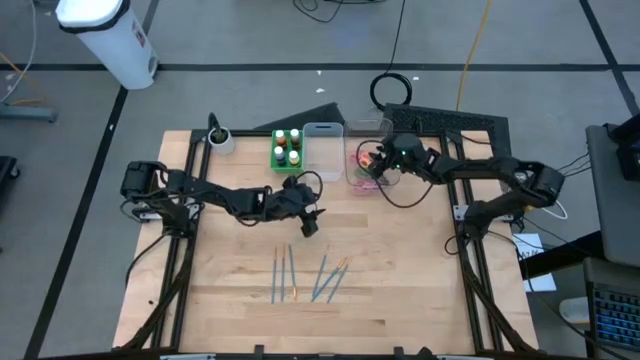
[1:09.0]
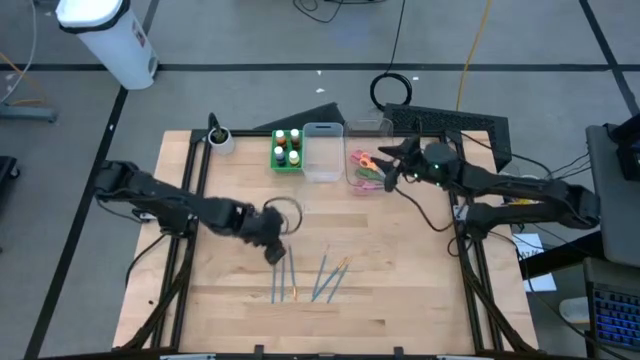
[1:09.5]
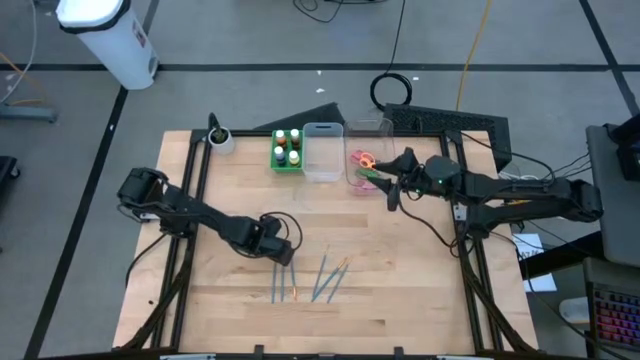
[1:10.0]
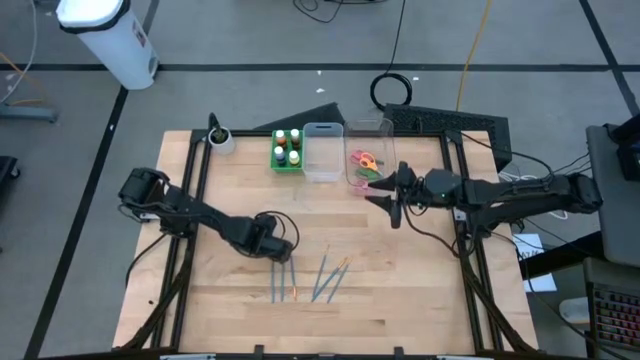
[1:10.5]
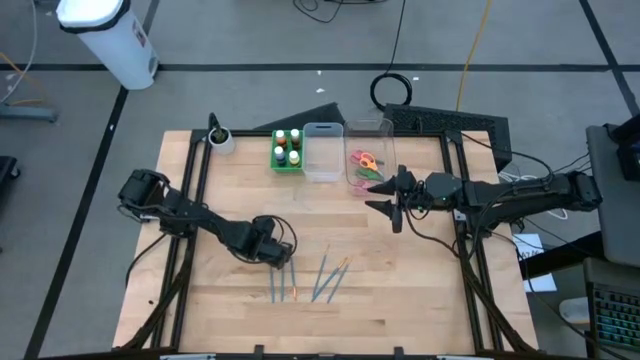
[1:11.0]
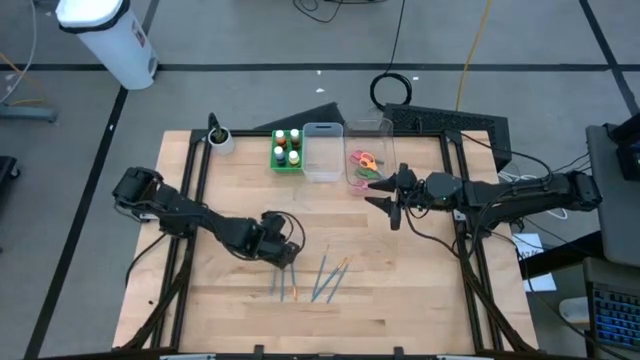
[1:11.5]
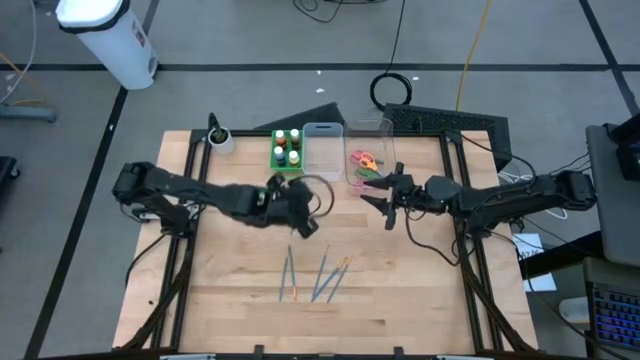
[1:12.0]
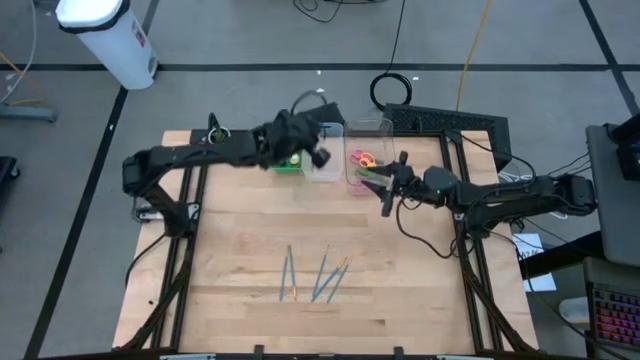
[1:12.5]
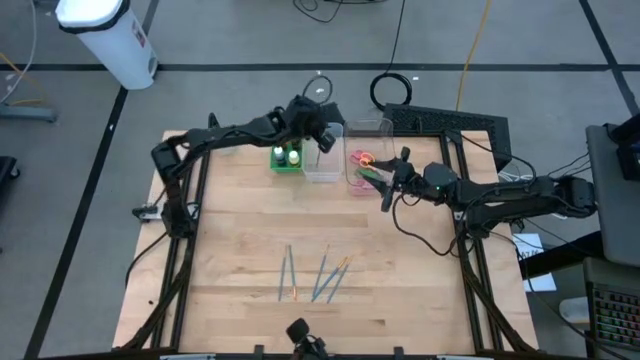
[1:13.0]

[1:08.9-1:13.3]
Task: Pick & Place Paint Supplies
Put the blue paint brush into the white bin

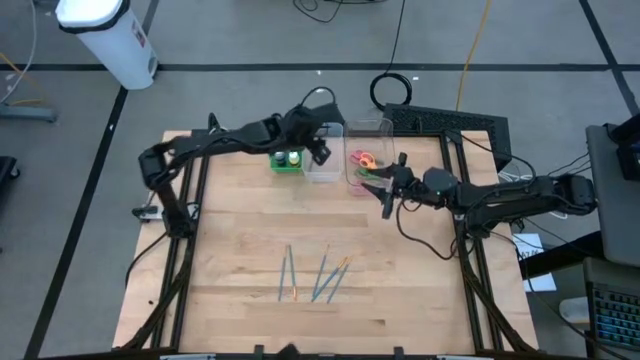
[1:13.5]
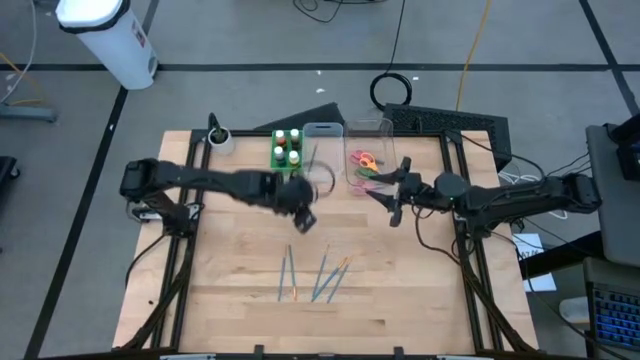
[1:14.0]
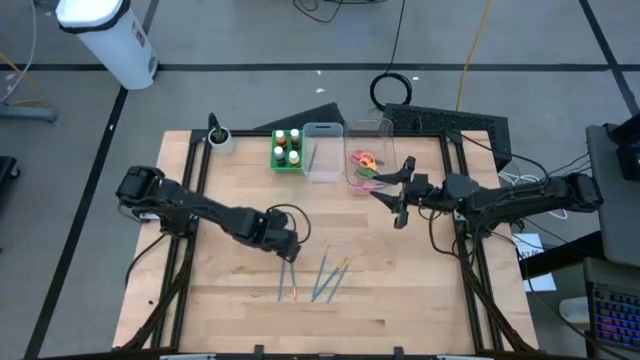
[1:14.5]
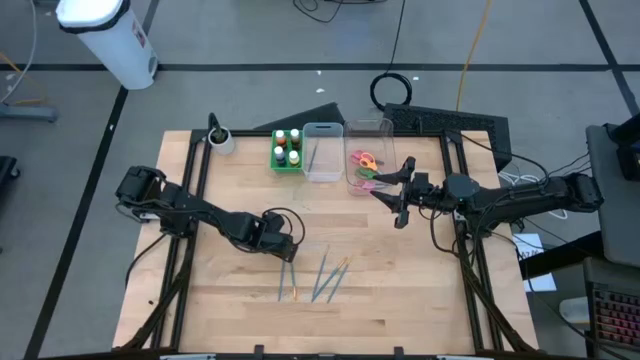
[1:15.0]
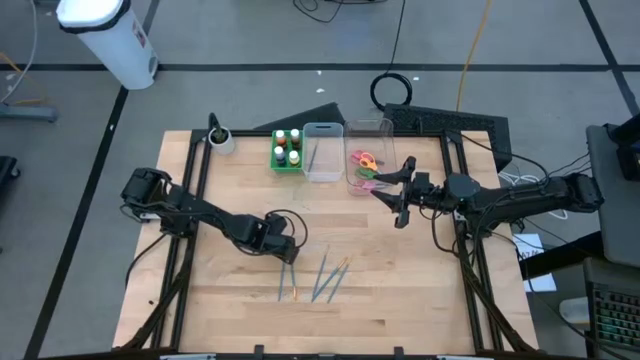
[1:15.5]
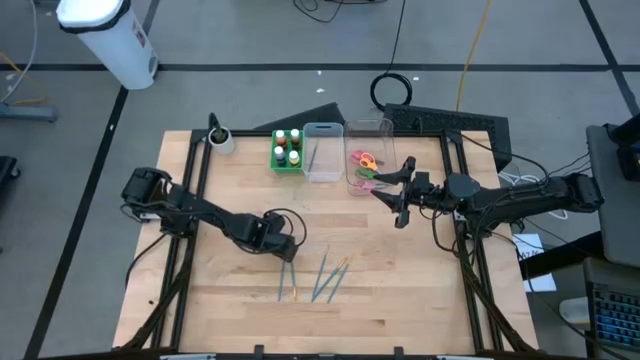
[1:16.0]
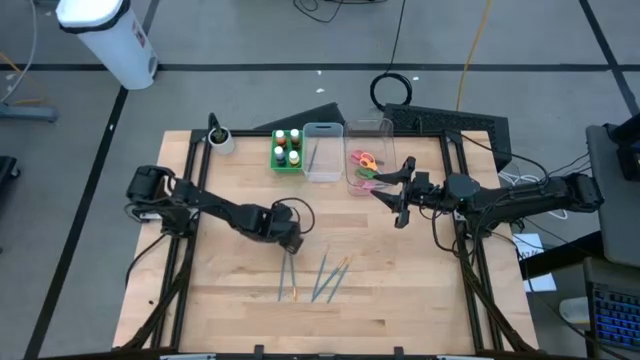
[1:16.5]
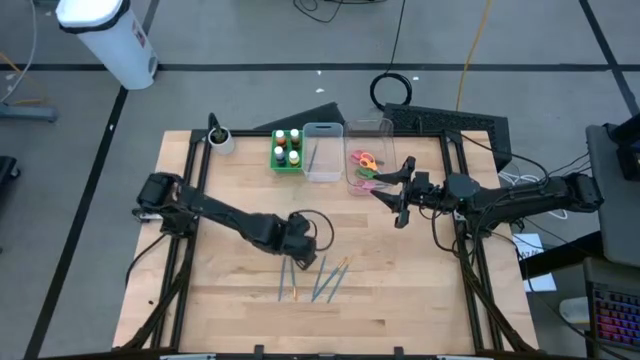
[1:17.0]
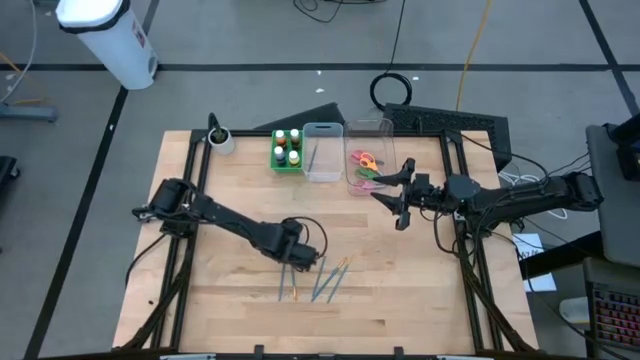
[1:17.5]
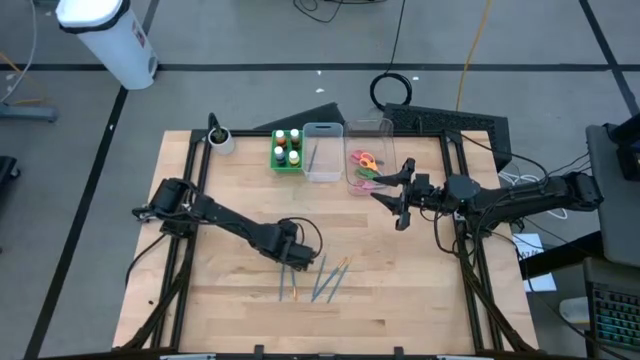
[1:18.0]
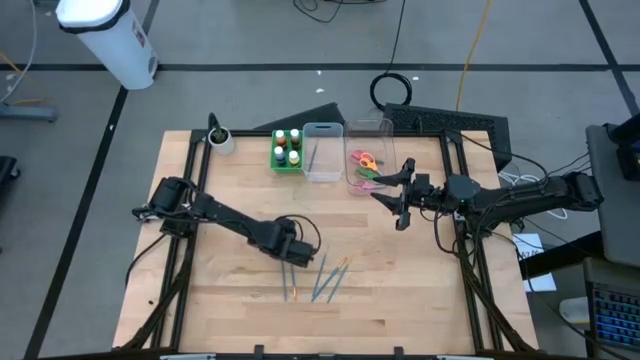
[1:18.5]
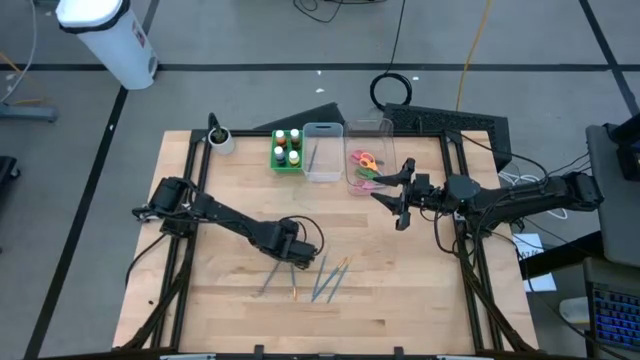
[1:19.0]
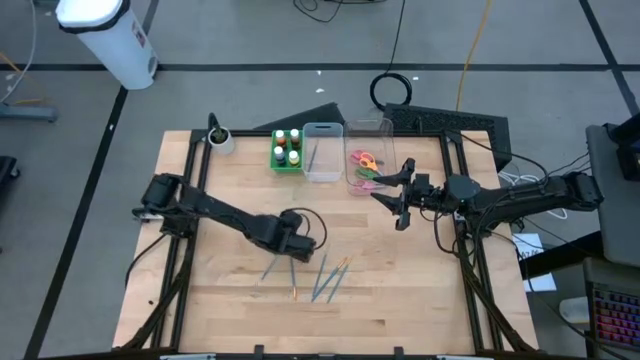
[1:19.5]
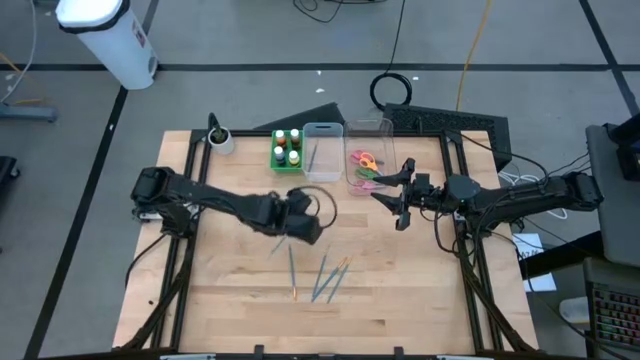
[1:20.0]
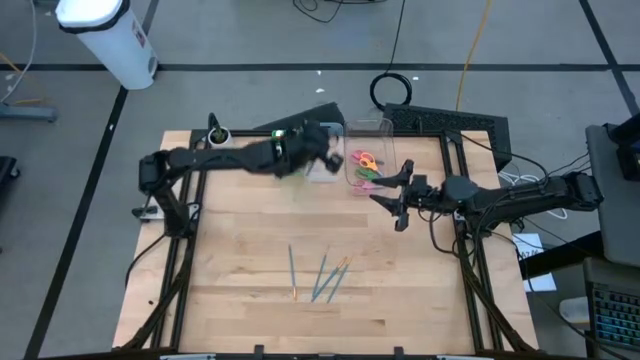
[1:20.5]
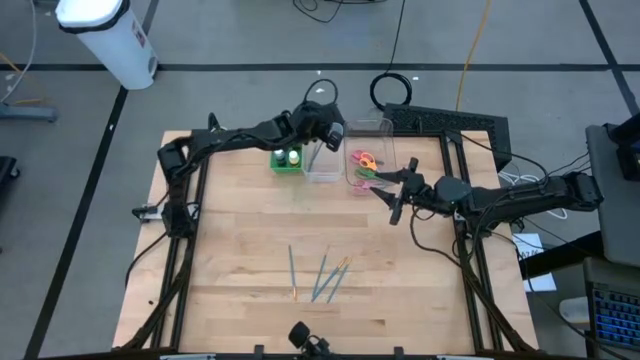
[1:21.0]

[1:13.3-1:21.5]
Put the blue paint brush into the white bin

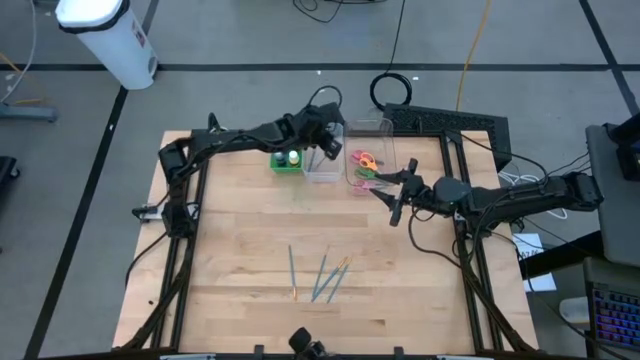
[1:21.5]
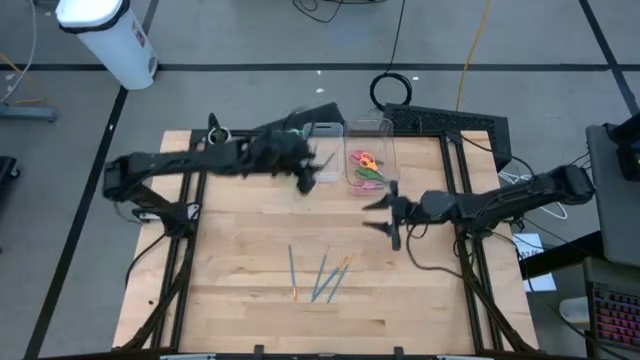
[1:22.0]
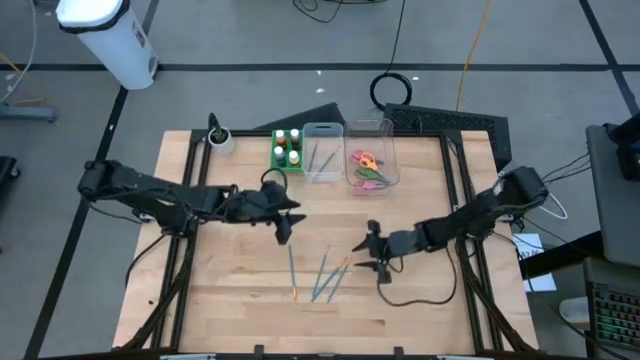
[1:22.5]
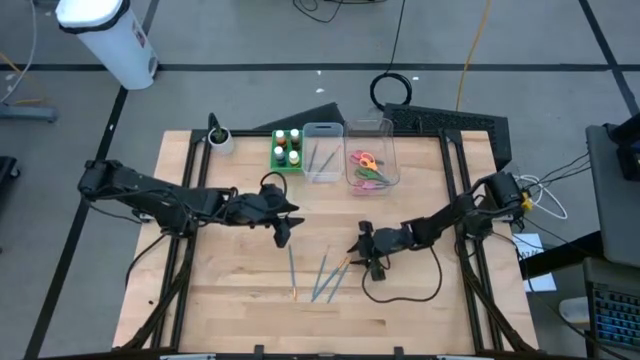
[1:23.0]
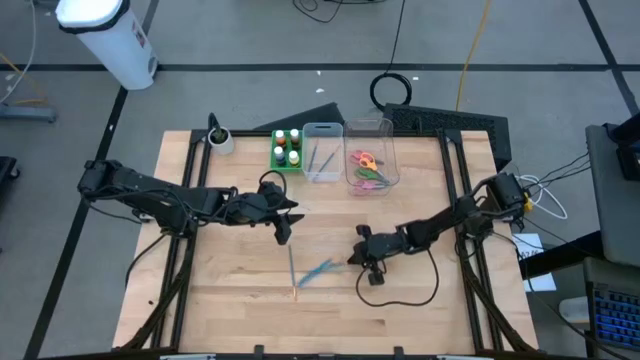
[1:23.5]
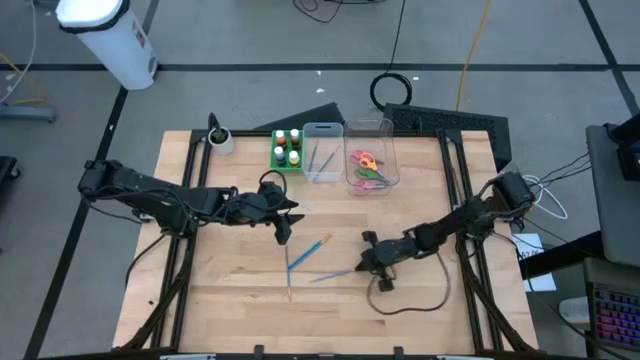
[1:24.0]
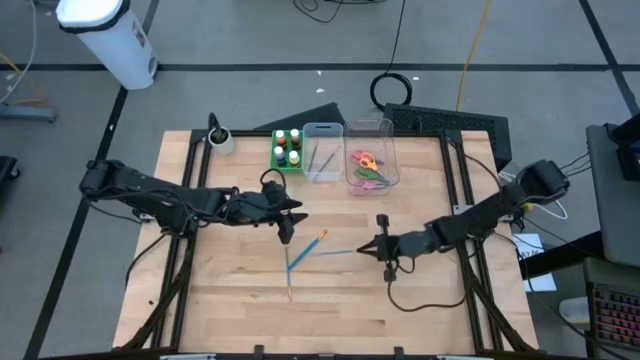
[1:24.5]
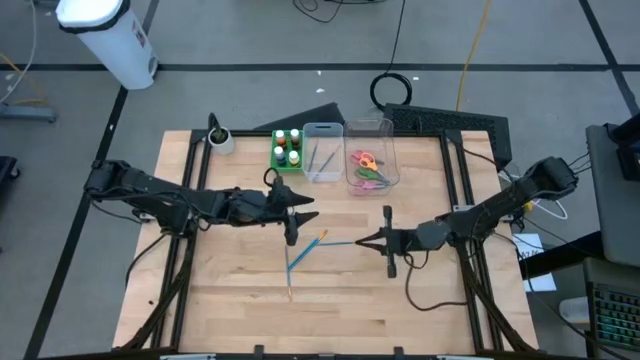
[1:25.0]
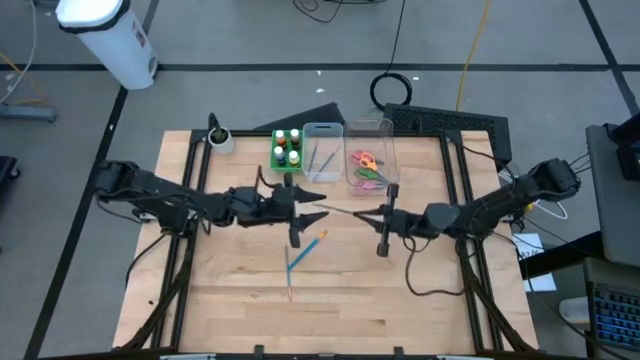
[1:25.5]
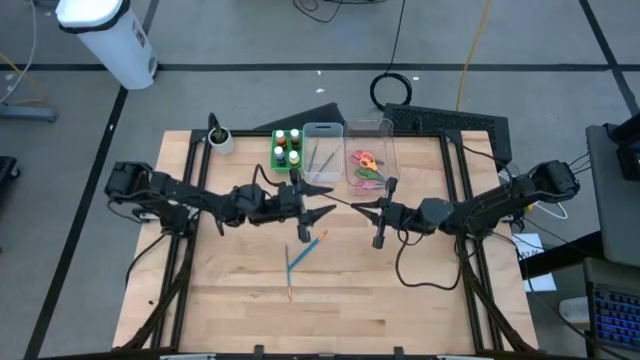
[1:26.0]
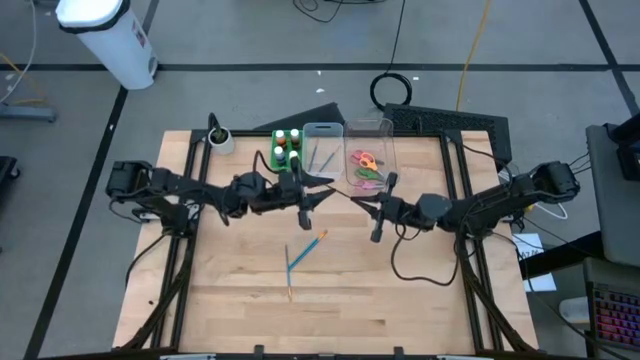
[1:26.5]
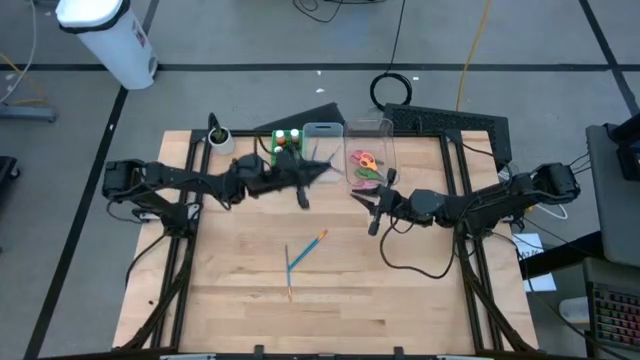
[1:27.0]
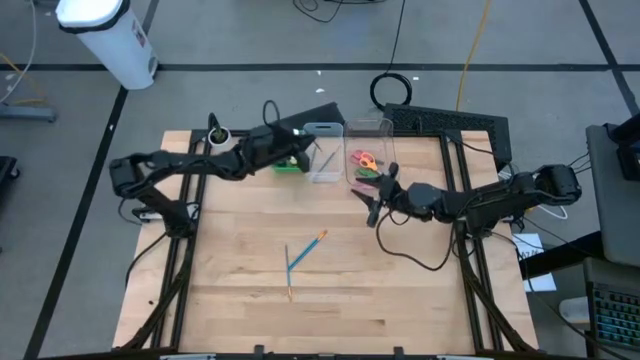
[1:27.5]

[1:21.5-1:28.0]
Put the blue paint brush into the white bin

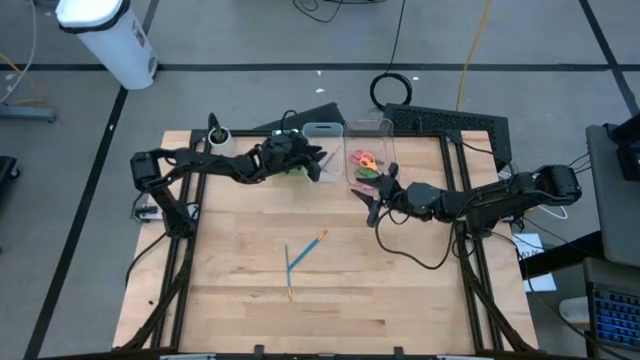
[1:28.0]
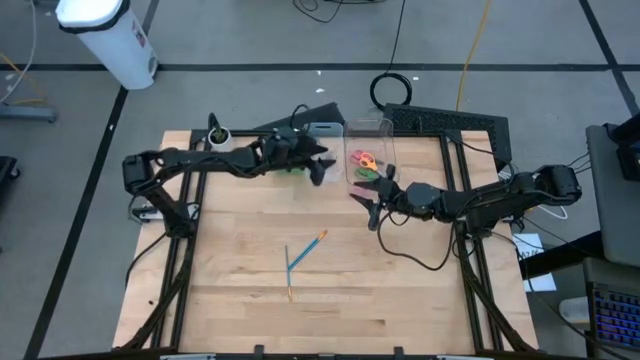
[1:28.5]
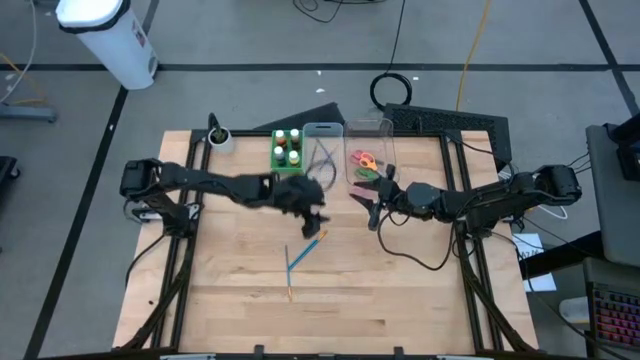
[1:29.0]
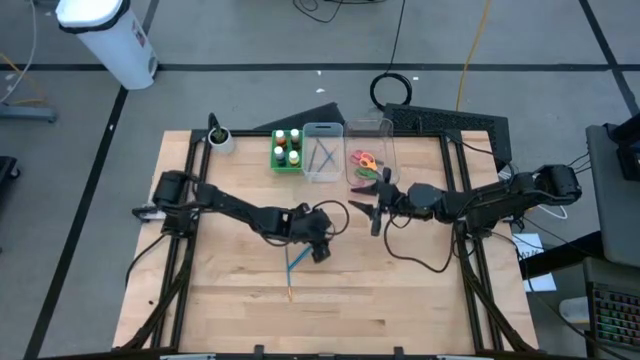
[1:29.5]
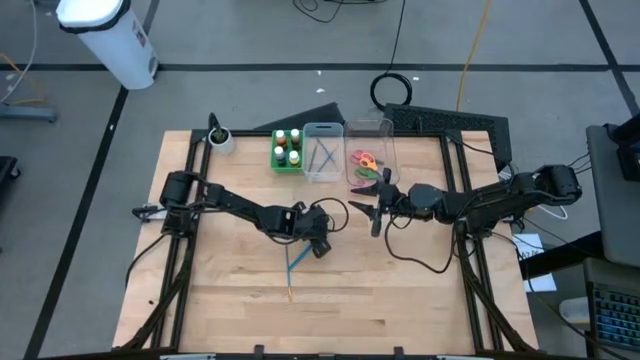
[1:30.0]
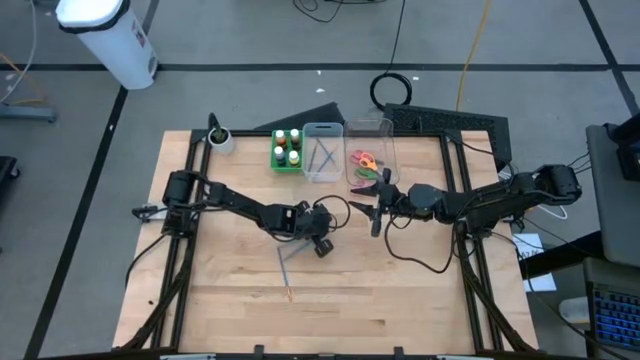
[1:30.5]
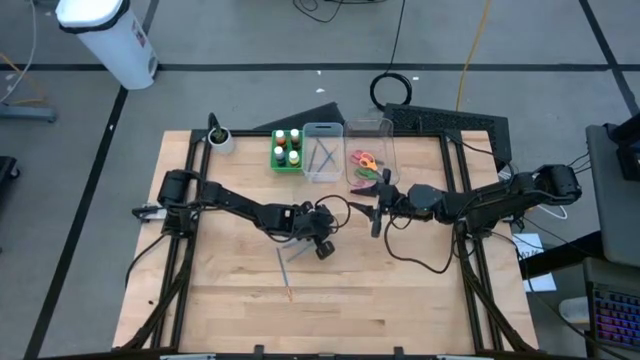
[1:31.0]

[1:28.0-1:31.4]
Put the blue paint brush into the white bin
